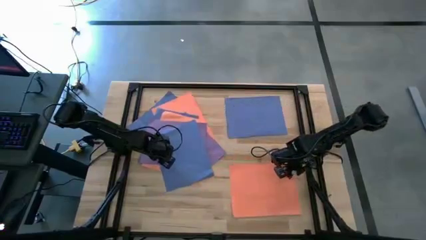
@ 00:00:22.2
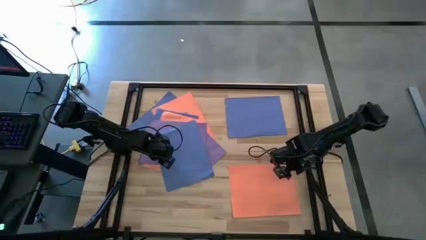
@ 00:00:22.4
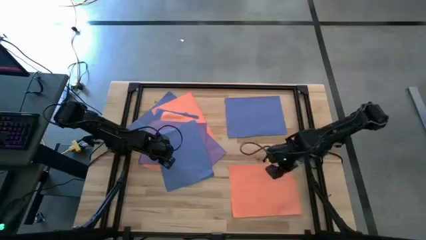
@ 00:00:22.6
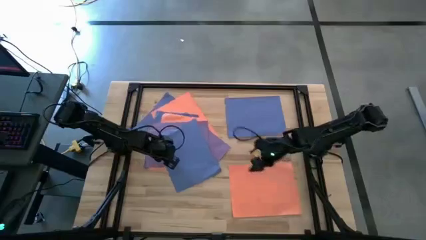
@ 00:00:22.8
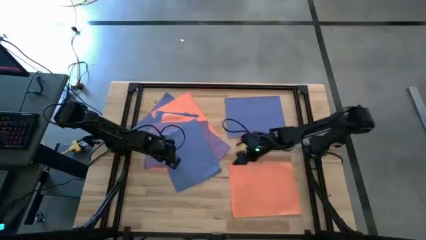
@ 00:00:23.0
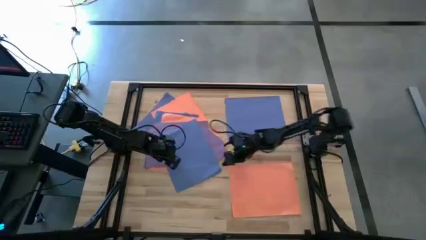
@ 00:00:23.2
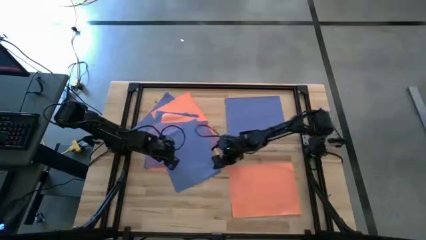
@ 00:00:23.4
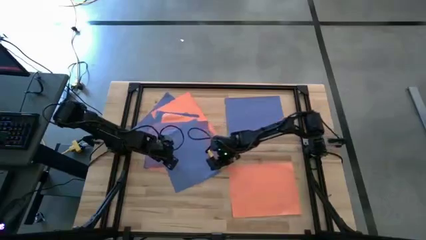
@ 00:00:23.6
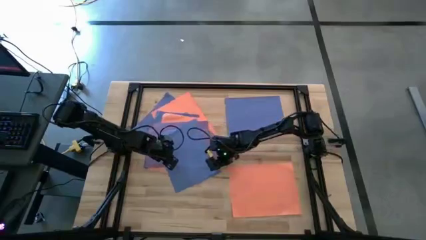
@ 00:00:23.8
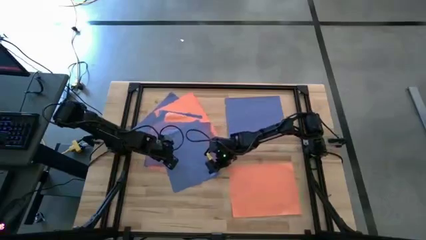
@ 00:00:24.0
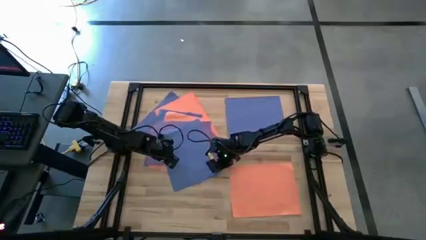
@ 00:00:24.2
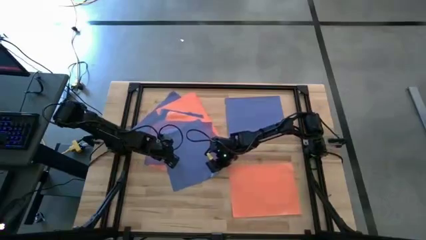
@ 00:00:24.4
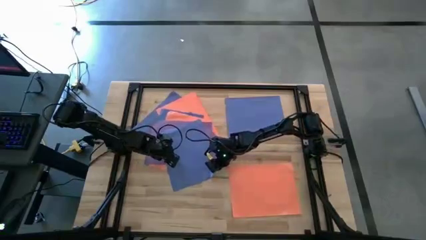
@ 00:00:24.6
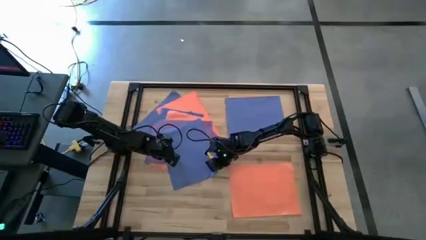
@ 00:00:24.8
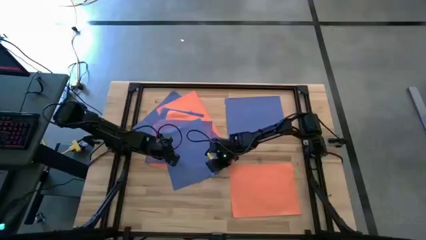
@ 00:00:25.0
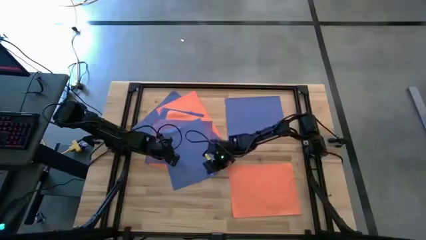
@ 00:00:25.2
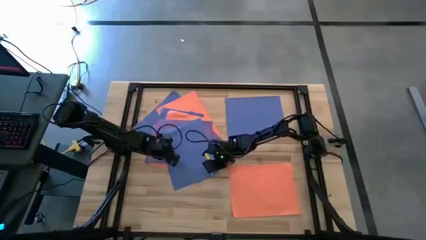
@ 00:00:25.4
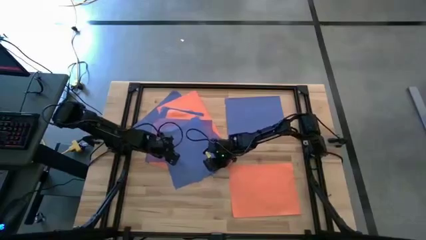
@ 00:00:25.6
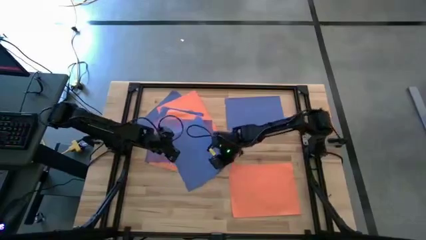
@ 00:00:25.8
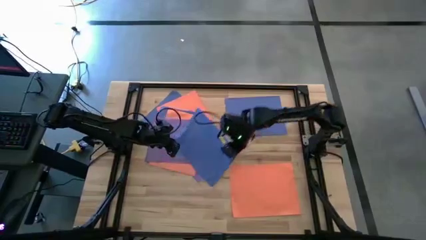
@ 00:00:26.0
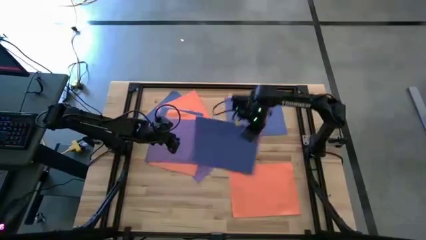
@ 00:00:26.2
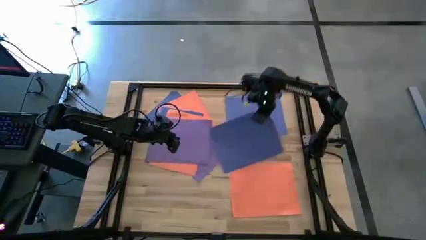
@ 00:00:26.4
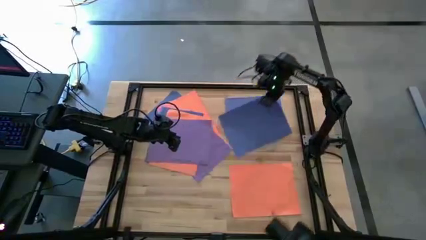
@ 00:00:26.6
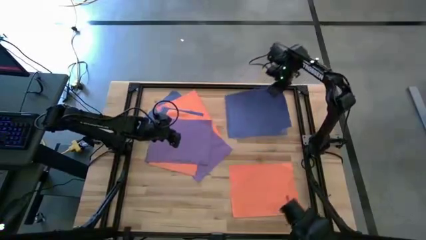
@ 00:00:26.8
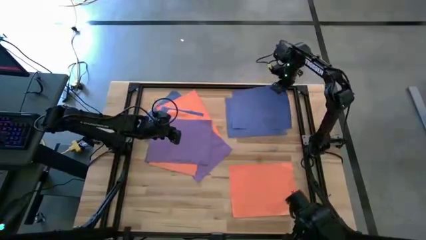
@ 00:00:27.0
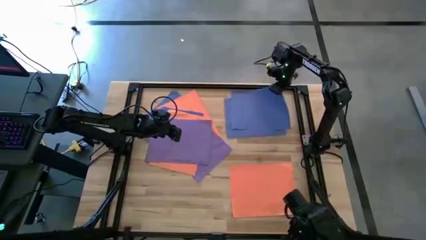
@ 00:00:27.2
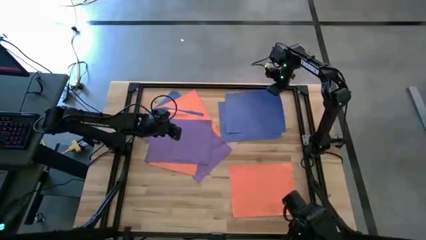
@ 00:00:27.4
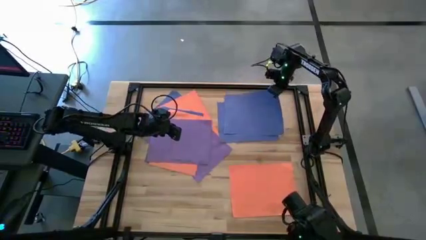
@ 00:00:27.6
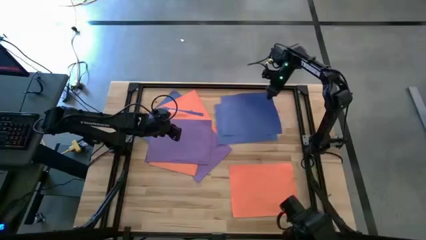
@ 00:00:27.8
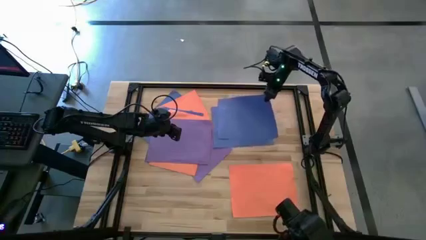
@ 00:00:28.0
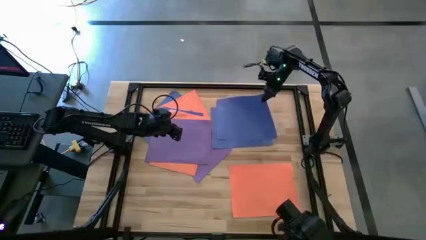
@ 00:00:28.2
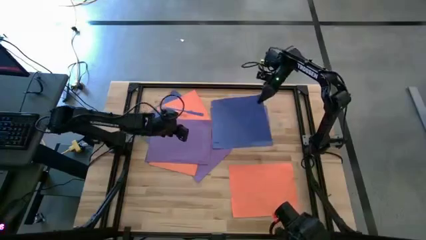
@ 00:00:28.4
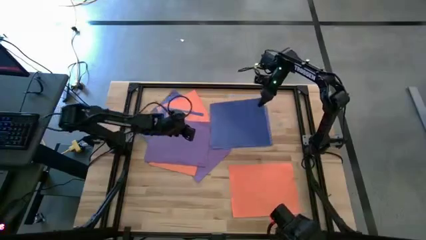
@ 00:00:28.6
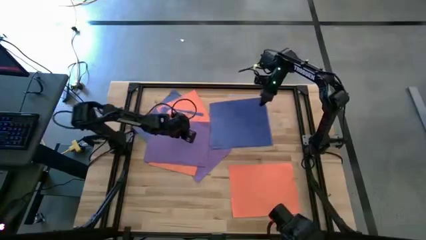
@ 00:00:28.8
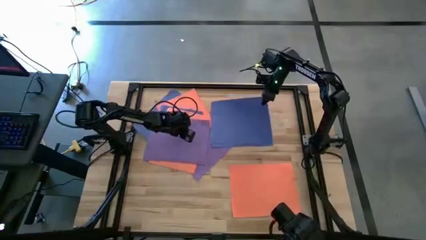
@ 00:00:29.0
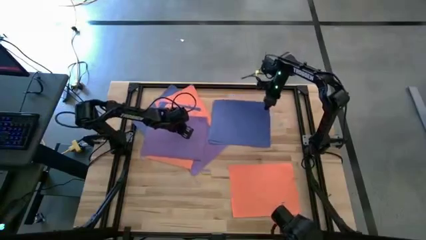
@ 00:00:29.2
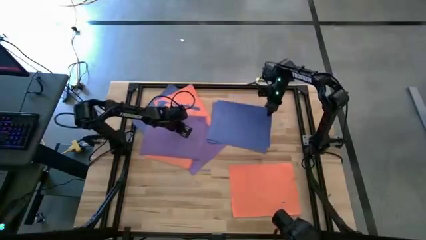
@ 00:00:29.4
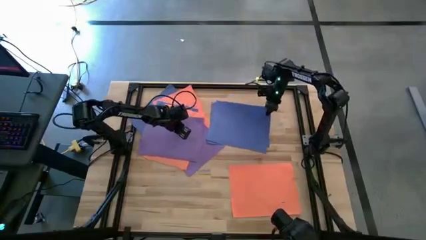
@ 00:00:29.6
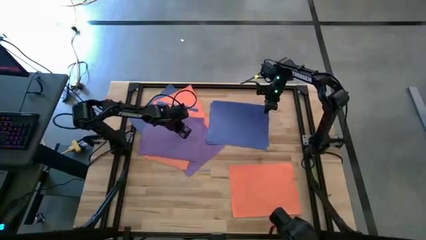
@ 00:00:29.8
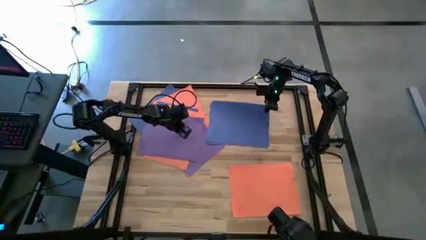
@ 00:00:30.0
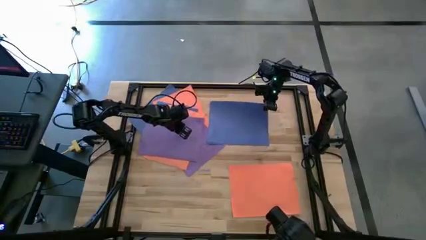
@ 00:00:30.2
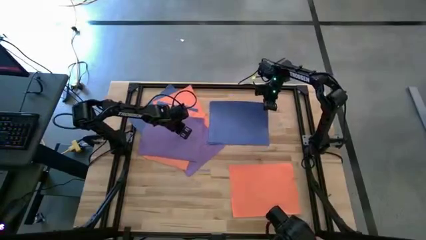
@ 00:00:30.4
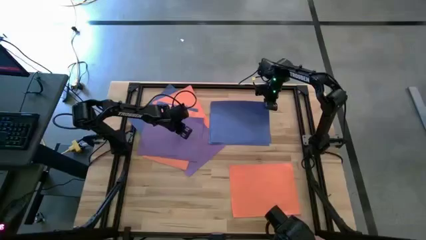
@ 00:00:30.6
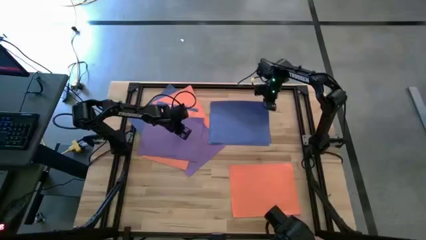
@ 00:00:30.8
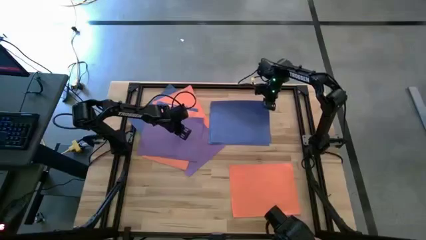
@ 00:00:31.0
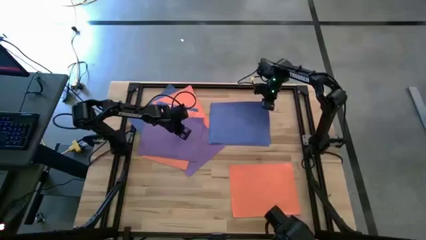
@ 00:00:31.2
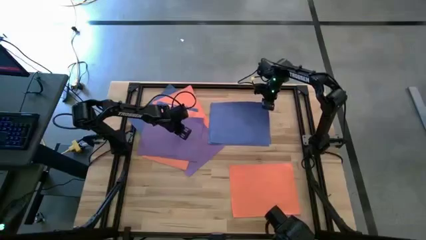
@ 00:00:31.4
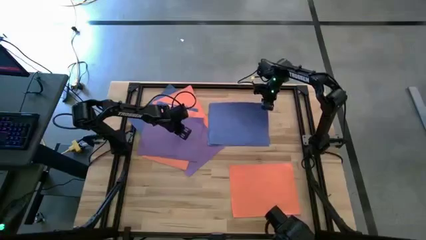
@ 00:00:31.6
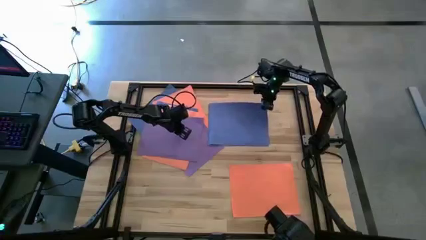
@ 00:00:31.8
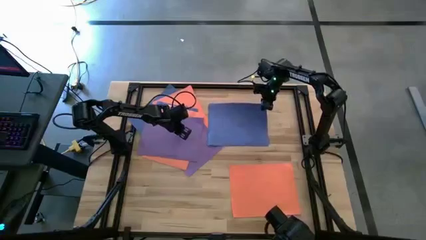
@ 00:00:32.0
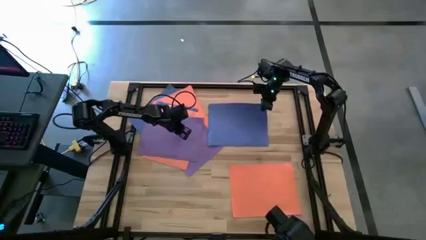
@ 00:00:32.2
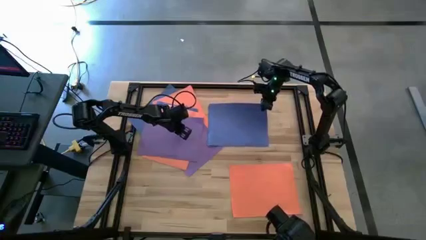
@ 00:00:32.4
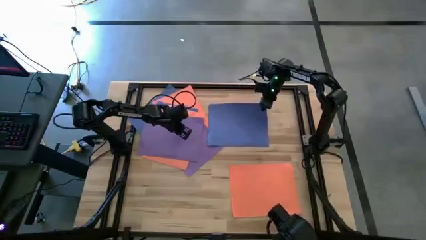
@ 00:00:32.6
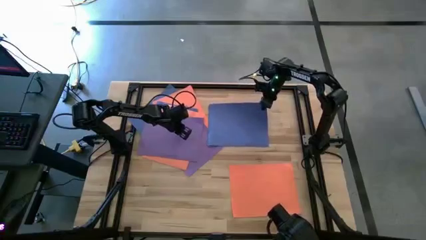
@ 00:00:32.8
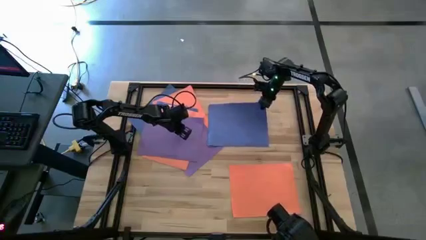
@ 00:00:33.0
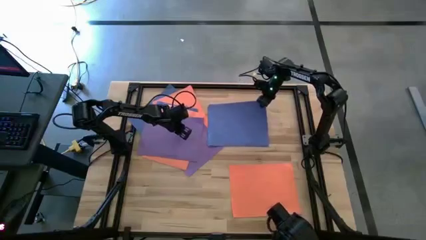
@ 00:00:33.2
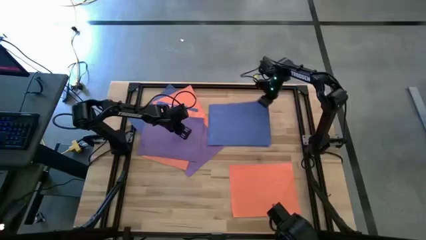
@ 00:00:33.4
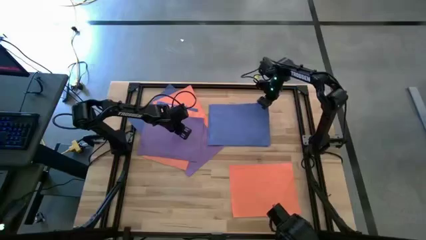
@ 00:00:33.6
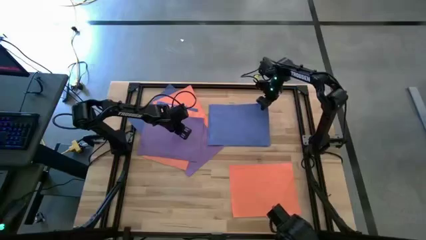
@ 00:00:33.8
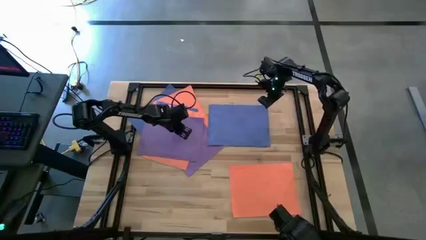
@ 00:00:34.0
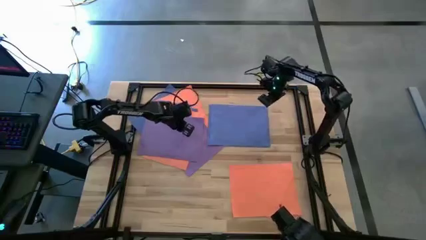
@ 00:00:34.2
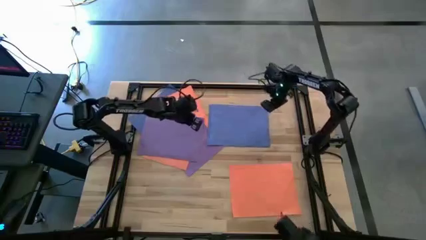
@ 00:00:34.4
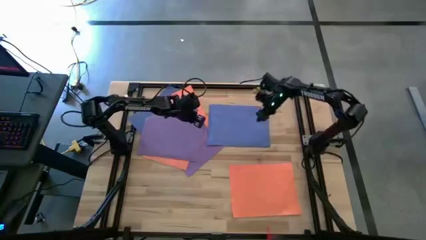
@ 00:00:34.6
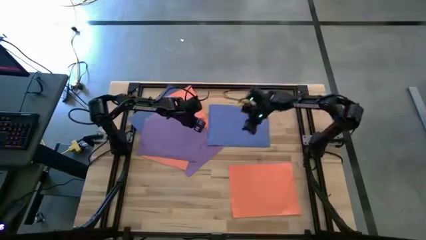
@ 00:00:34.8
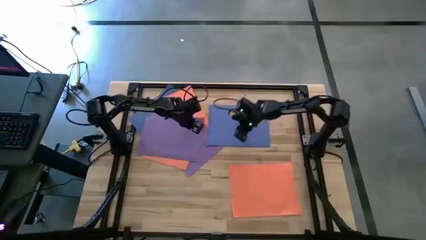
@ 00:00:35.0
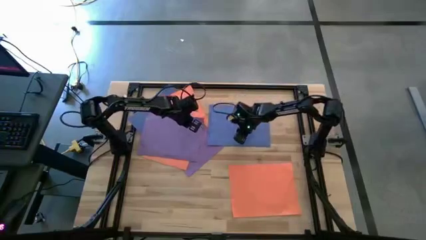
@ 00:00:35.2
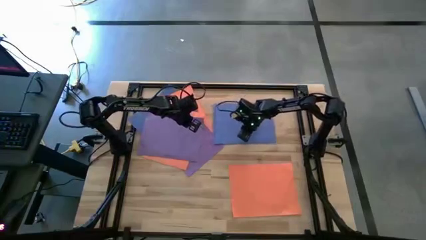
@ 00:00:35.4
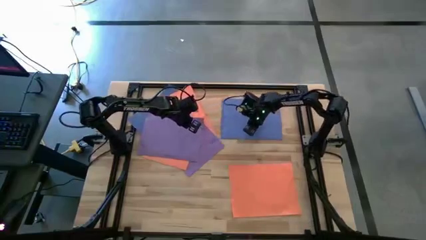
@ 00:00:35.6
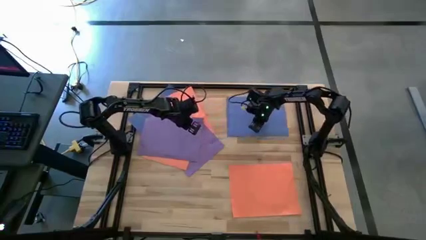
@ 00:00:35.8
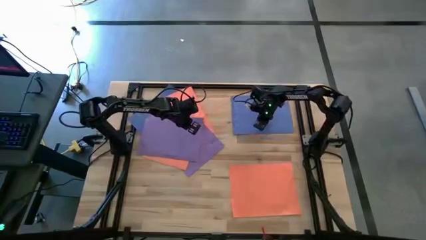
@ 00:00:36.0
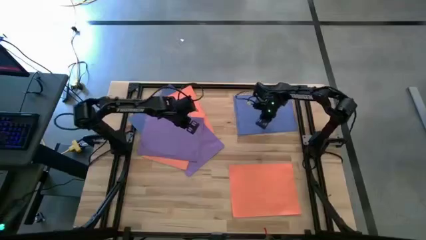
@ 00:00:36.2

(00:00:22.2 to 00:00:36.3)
Task: Organize paper
Stack the blue colored paper on top of the blue colored paper

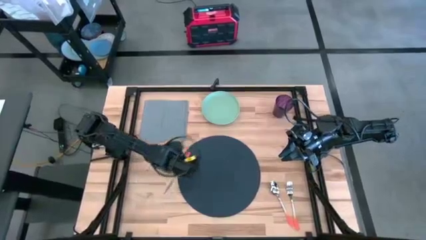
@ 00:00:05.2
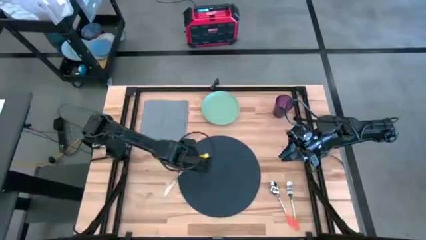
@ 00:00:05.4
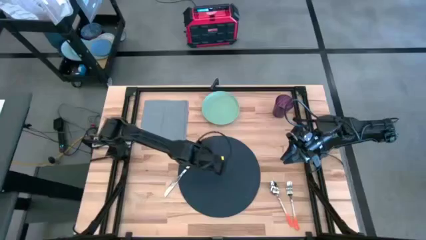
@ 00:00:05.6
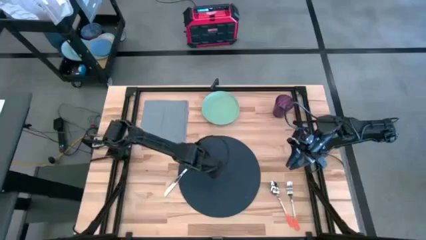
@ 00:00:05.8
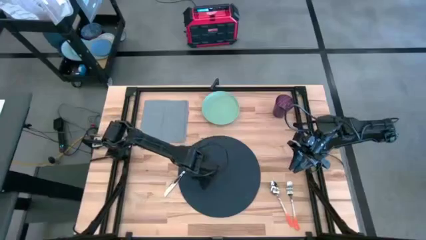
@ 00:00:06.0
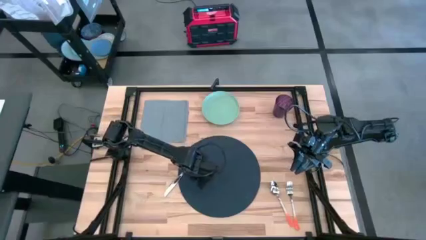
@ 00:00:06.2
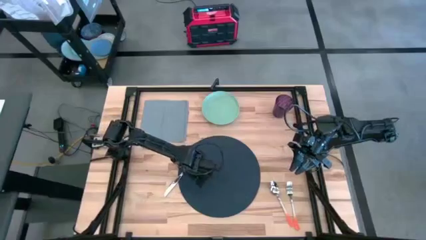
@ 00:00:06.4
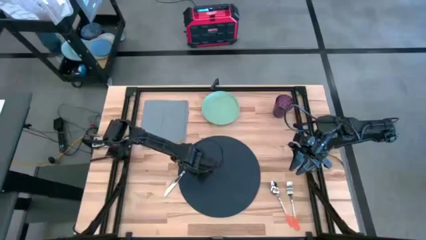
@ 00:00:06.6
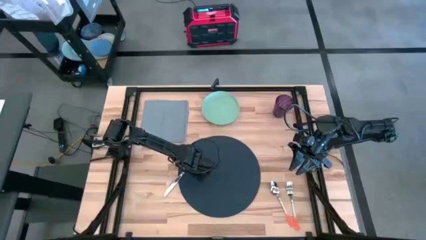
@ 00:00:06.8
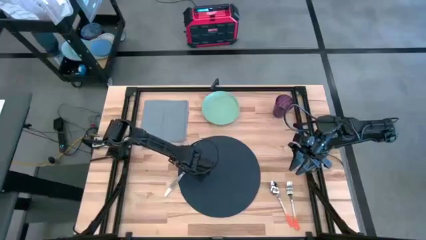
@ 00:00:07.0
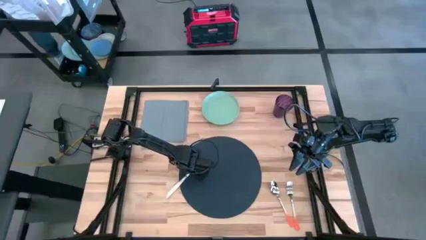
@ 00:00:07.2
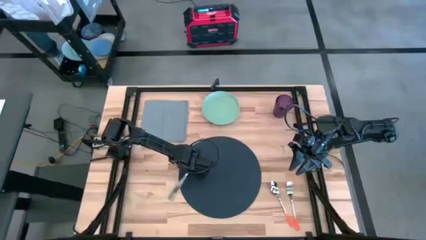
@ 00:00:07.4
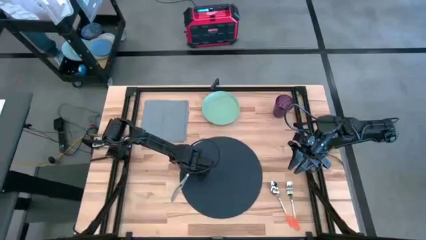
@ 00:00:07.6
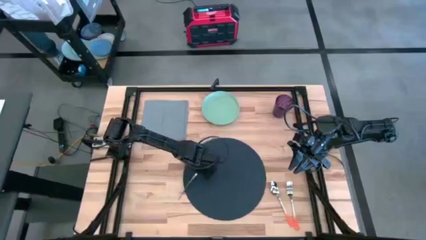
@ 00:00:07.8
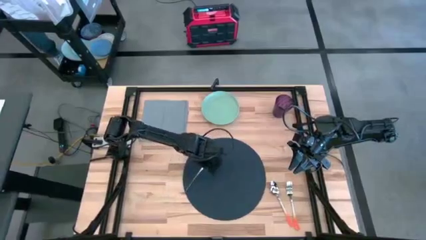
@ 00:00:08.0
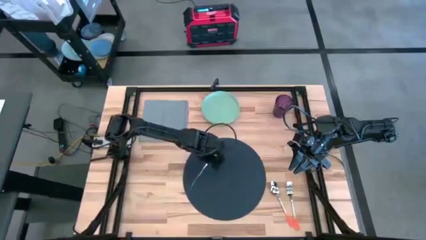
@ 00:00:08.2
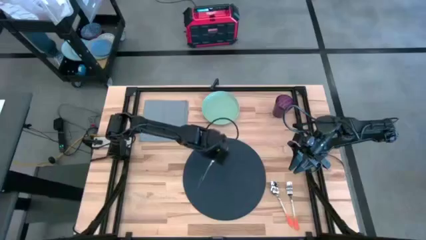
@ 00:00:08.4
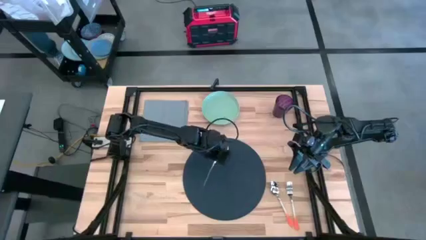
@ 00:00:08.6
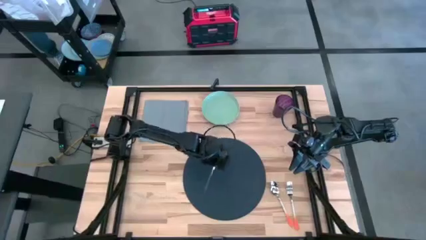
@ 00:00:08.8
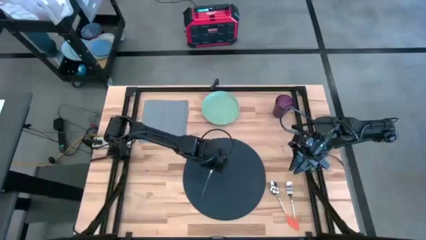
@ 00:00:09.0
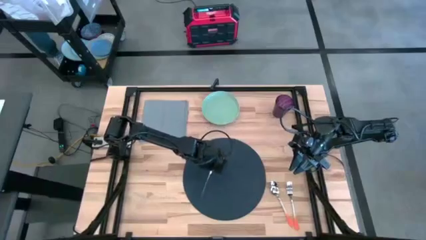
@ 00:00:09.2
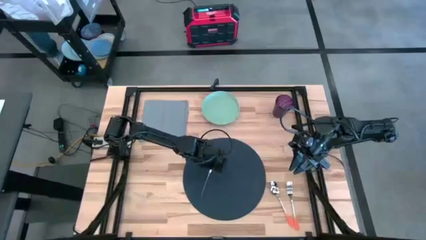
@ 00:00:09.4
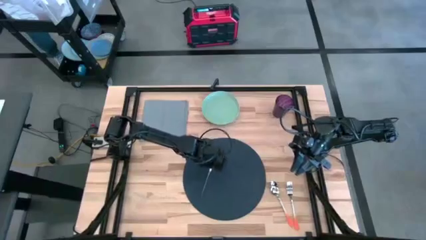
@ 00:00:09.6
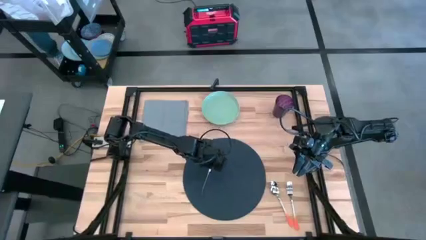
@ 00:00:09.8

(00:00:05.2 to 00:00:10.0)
Task: Set table place
Put the orange table knife on the dark gray placemat
